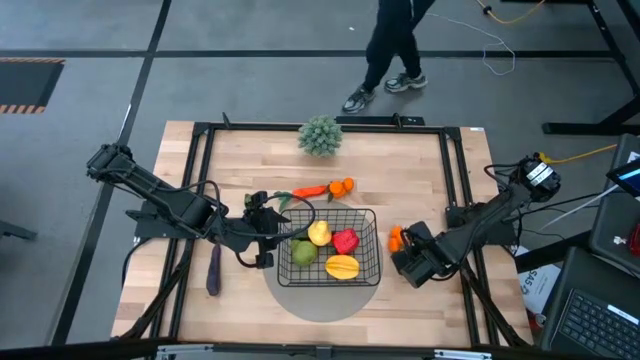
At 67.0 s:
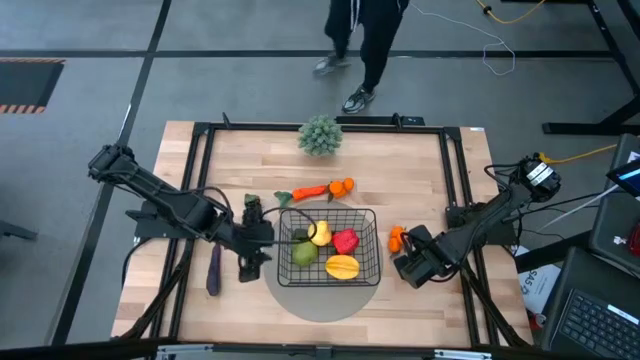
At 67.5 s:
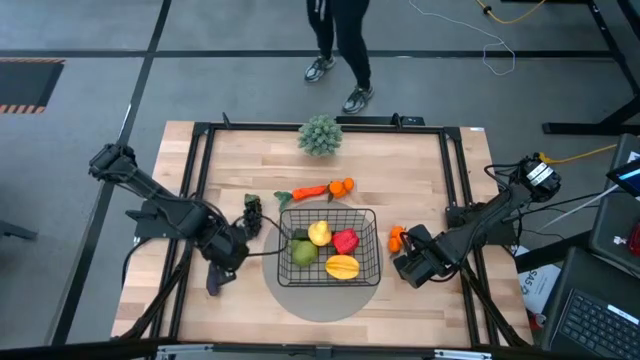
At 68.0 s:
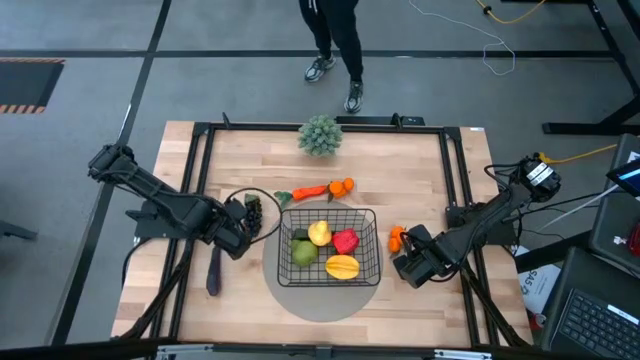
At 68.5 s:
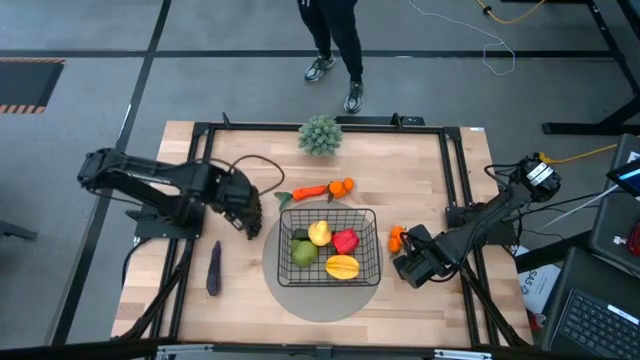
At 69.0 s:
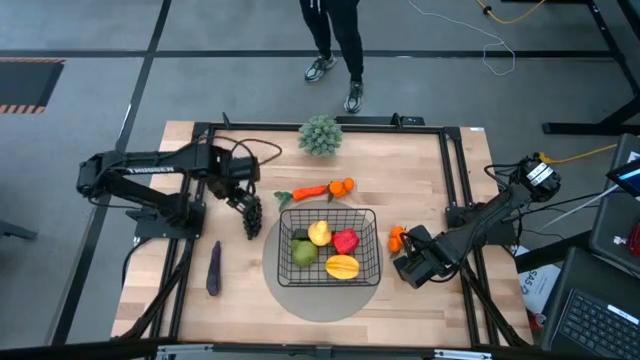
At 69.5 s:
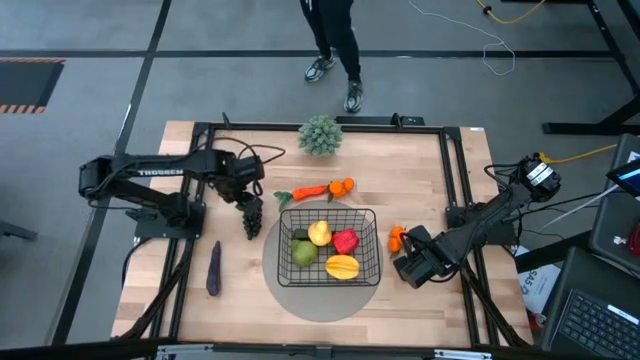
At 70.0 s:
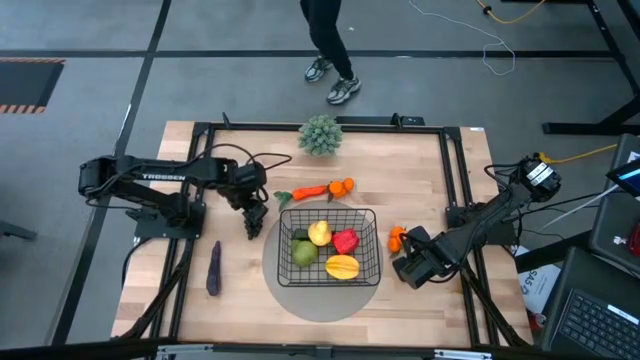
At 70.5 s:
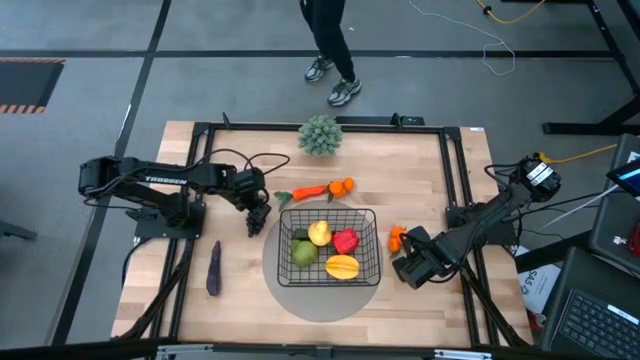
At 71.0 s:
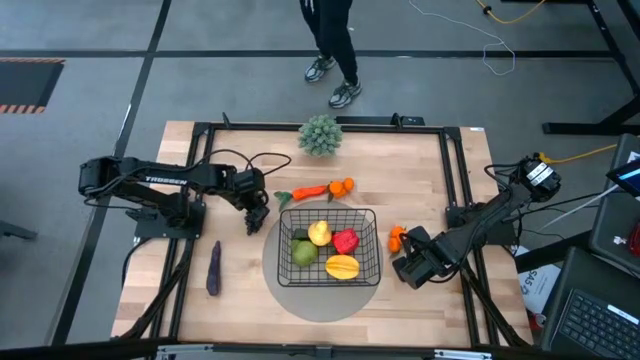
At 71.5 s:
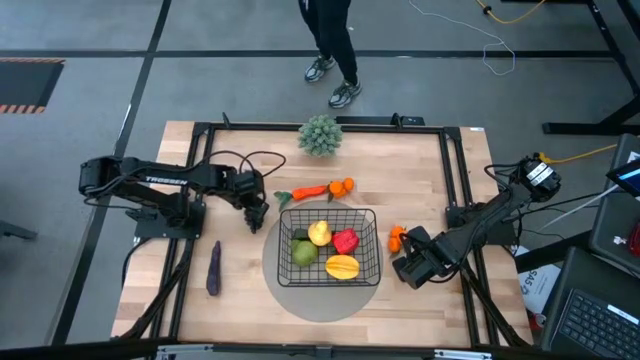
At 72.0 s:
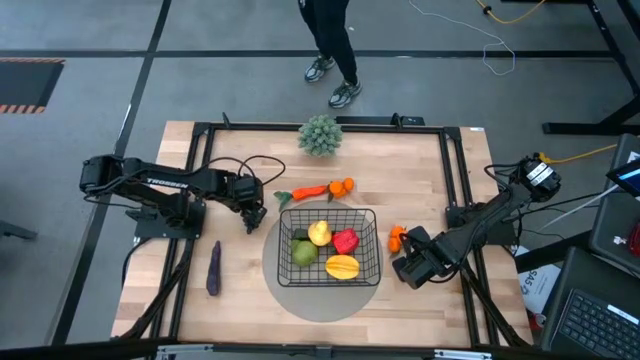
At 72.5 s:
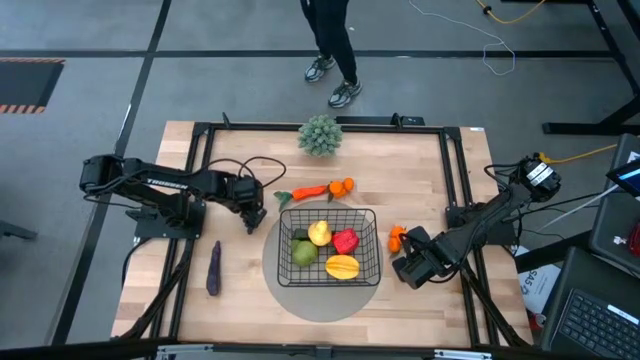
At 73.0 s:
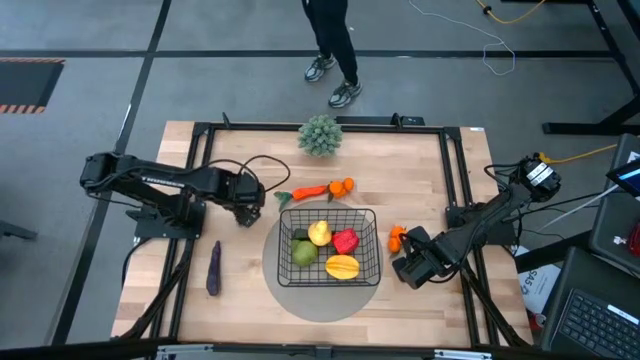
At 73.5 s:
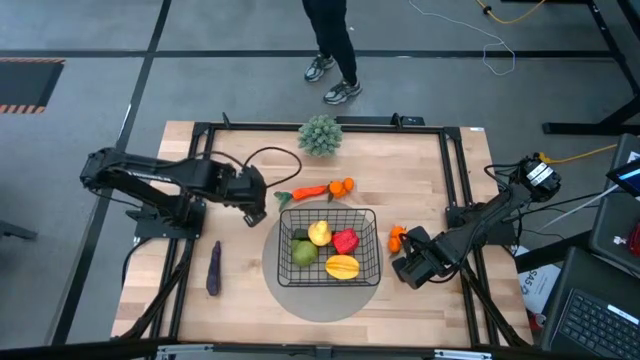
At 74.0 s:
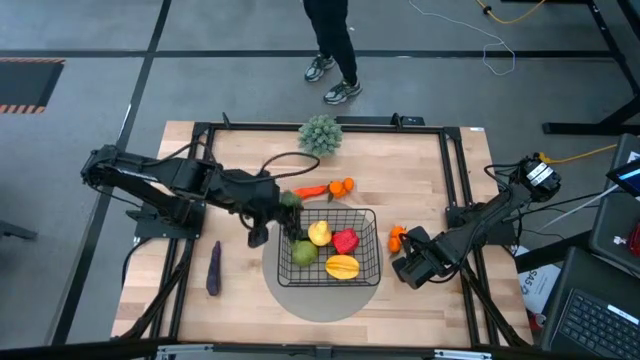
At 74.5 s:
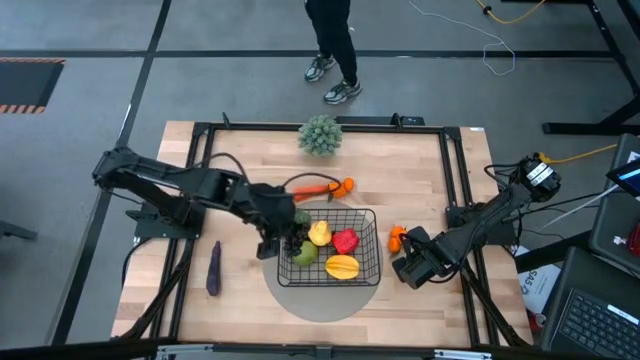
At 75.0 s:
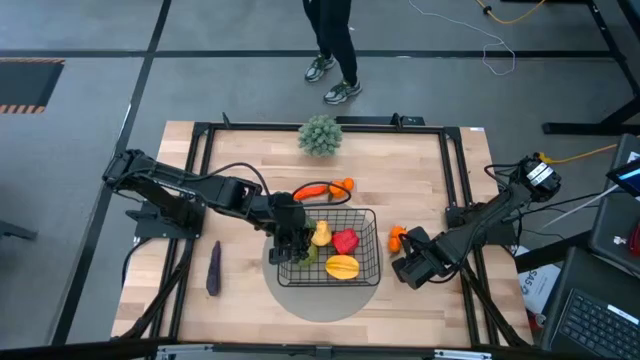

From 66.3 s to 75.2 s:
Task: Build produce basket
Put the grapes into the black wire basket

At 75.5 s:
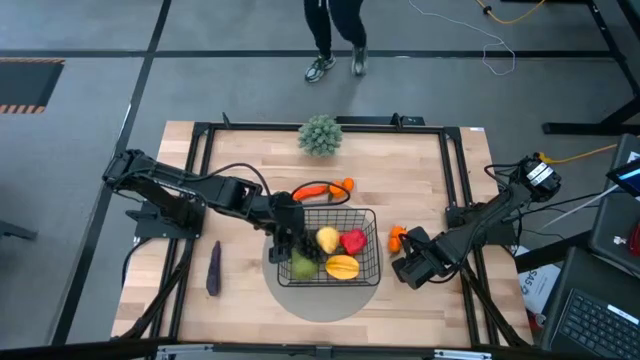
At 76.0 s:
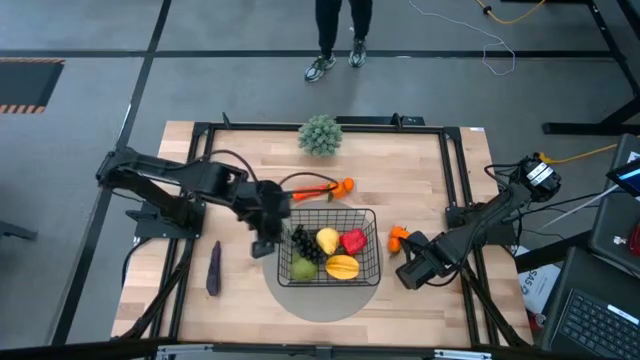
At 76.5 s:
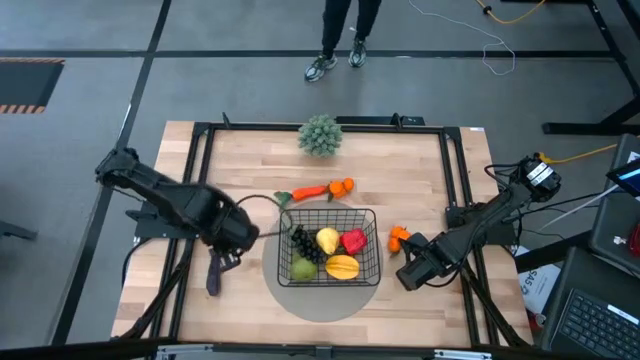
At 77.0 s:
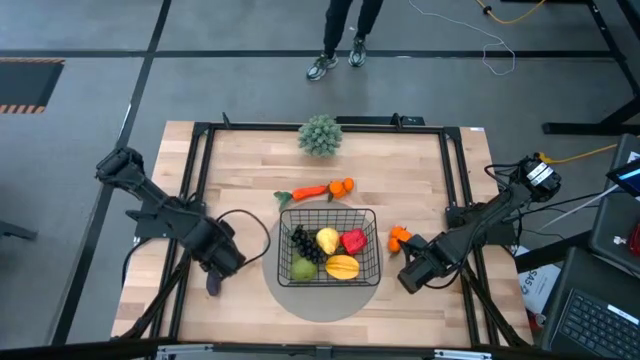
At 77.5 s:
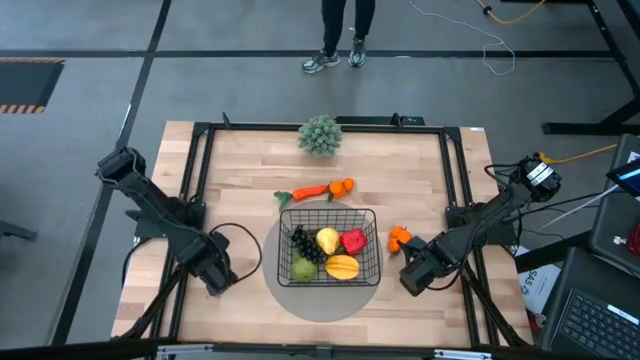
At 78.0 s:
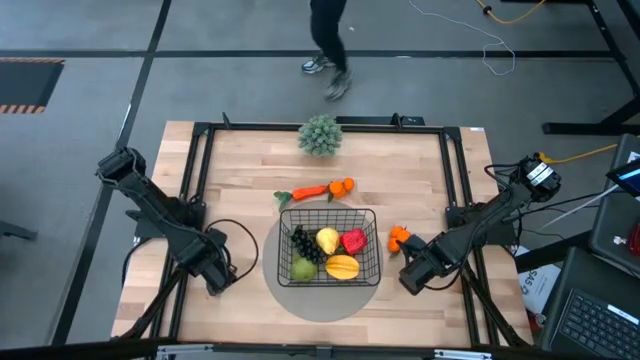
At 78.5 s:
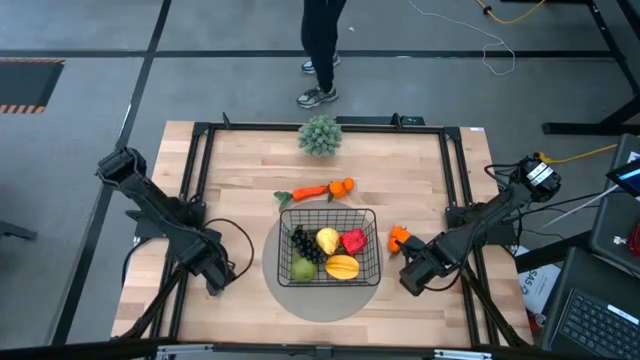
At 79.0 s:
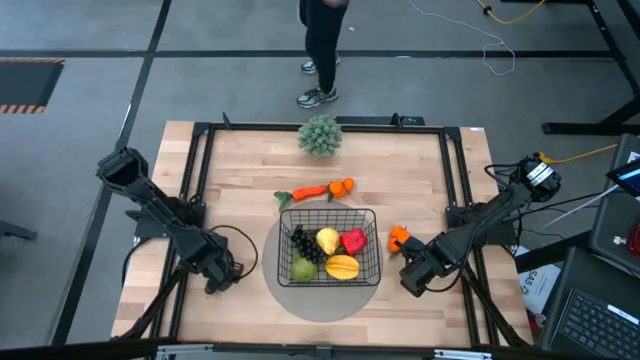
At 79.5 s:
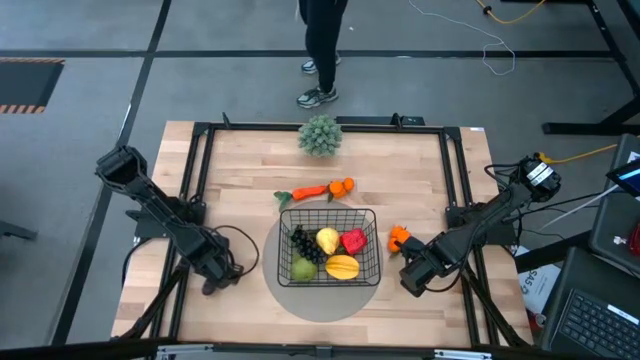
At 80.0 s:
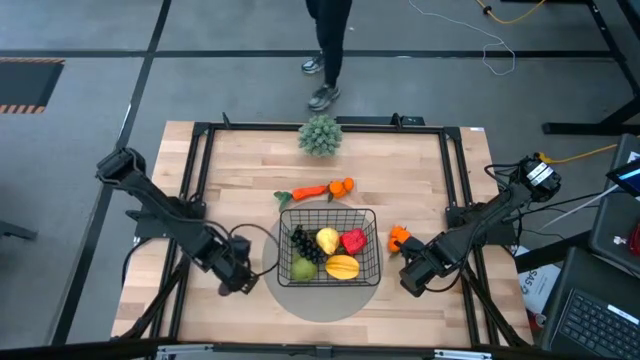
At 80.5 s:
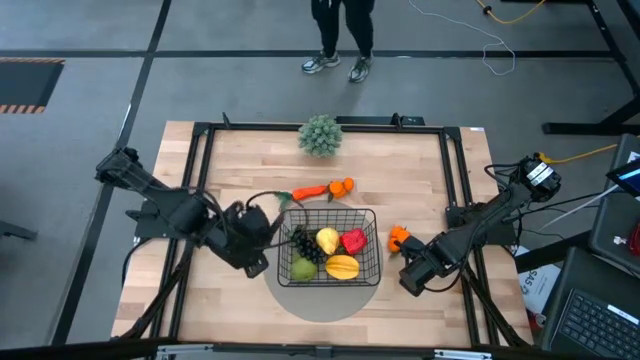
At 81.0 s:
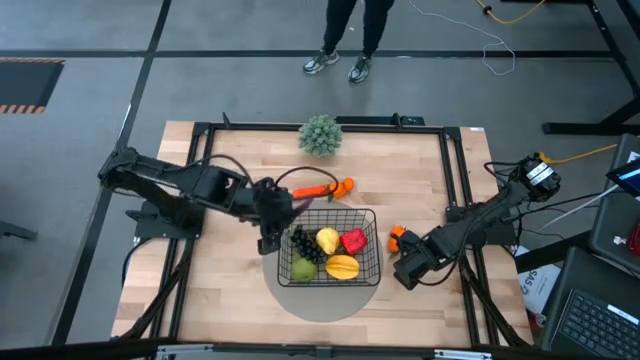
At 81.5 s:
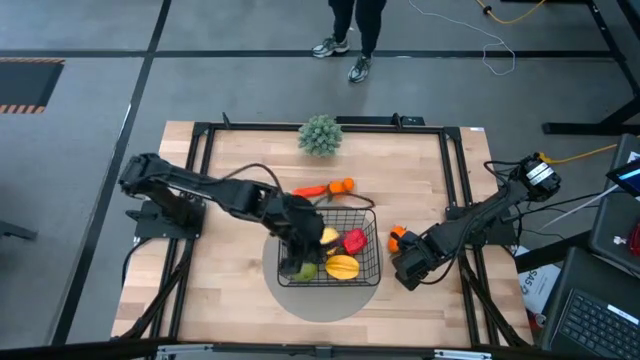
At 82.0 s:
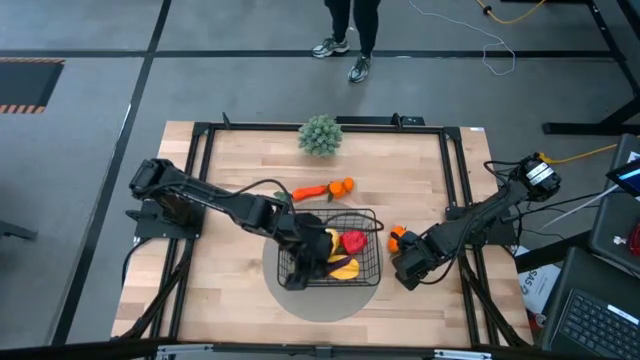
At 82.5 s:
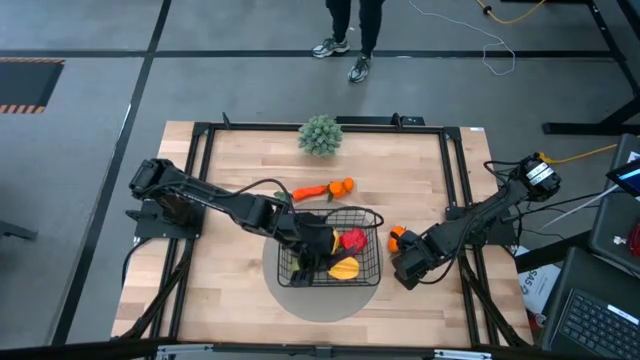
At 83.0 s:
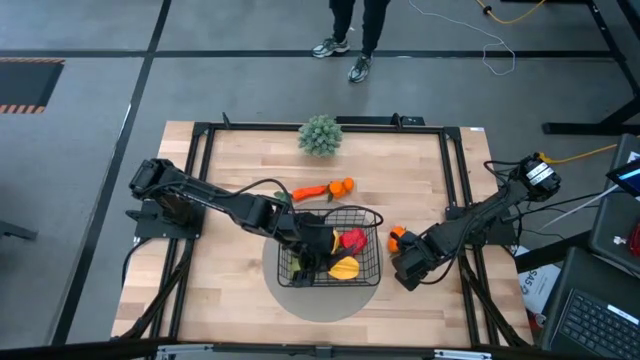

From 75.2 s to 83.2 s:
Put the eggplant into the black wire basket

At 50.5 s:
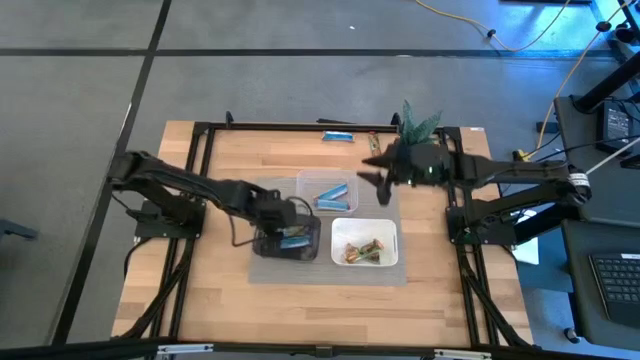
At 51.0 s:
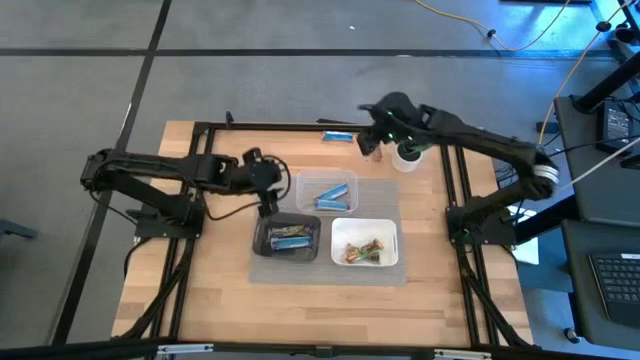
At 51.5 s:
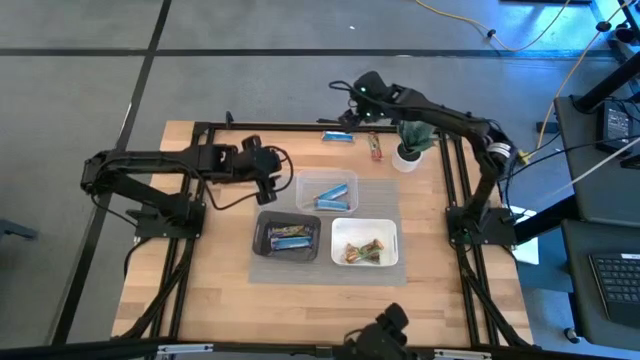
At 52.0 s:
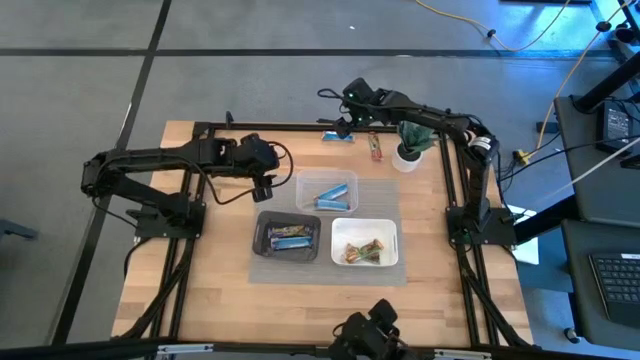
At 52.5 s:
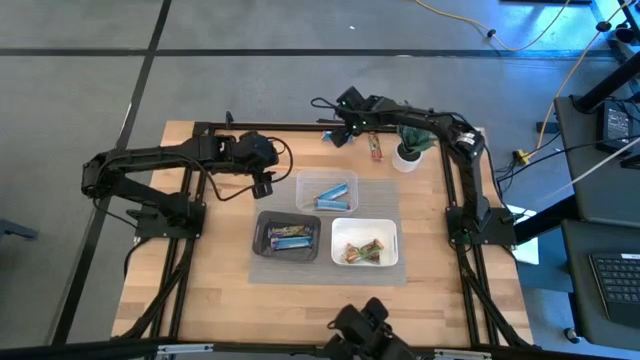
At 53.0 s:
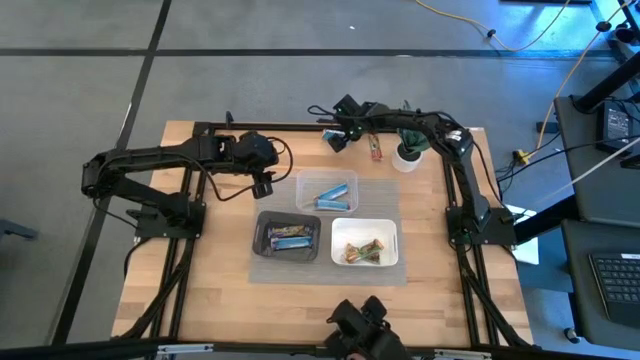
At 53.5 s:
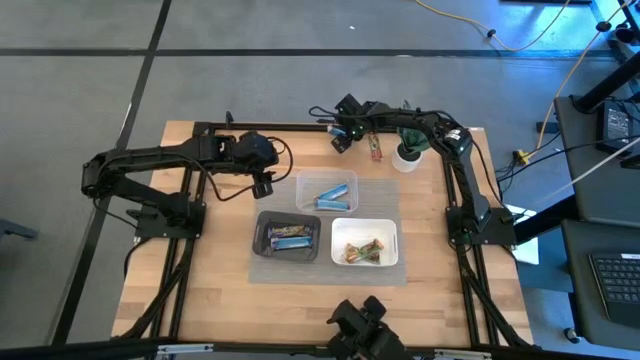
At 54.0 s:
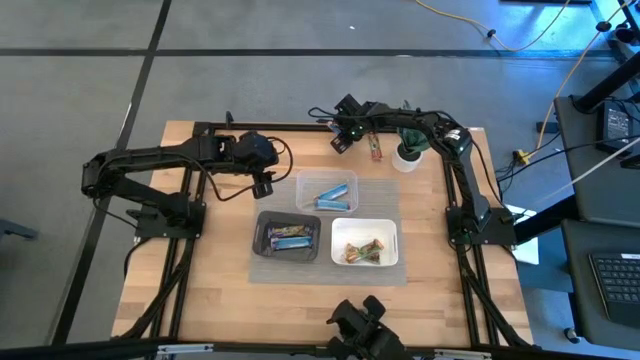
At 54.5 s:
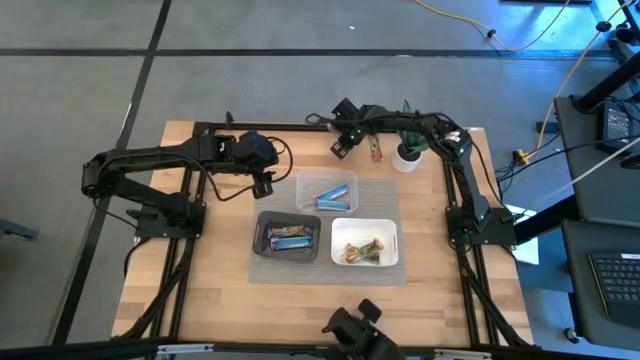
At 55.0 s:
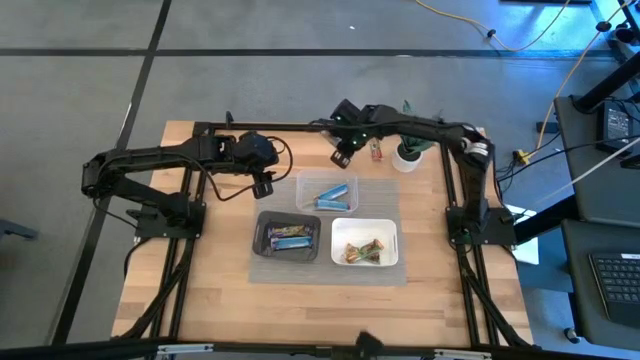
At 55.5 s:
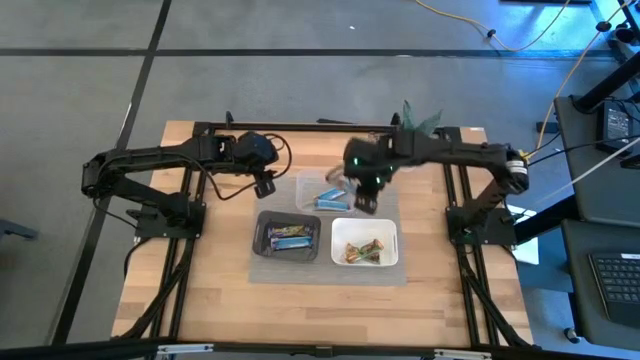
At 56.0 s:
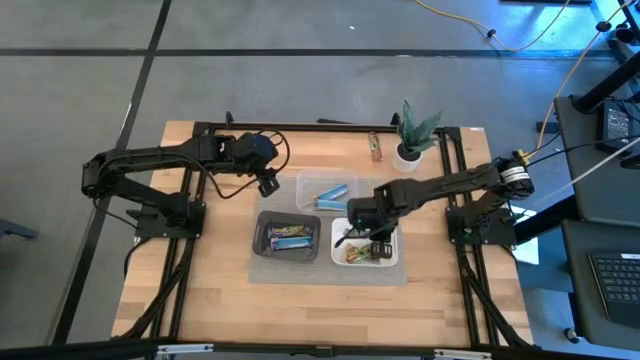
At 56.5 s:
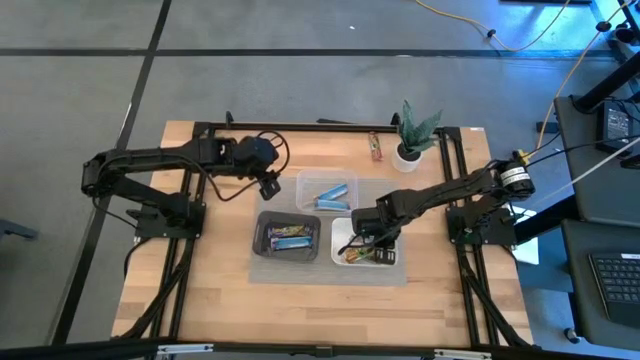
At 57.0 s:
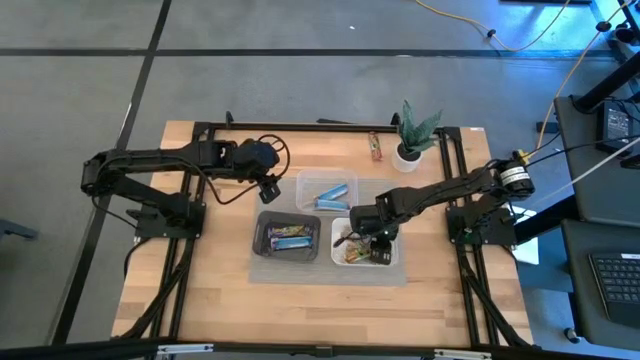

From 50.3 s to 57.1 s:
Task: Pick and place Granola Bars by type
Put the yellow granola bar into the white bin
